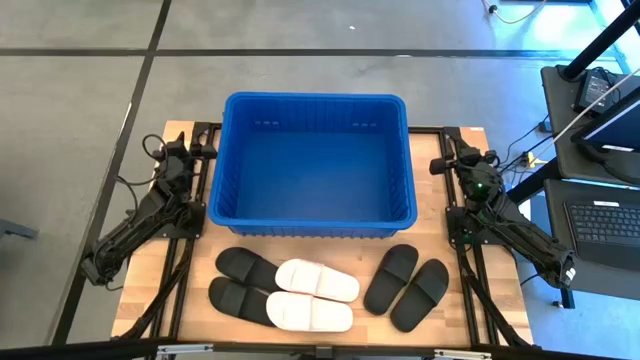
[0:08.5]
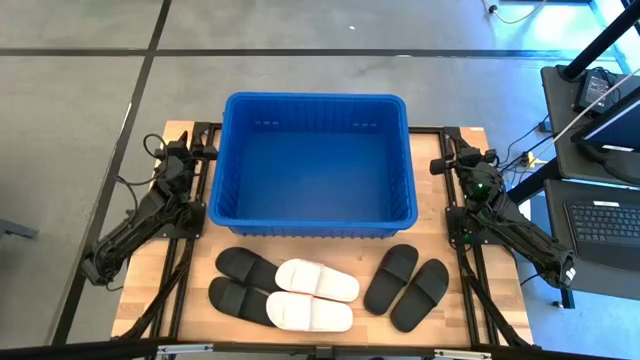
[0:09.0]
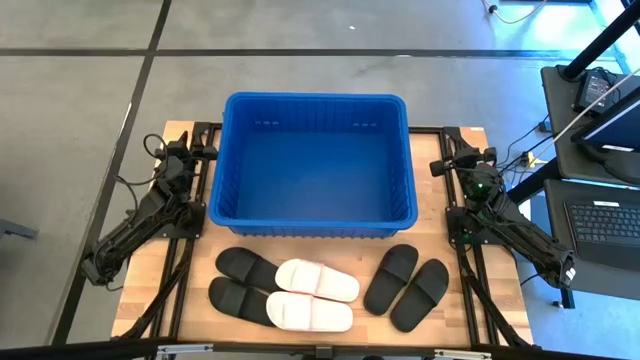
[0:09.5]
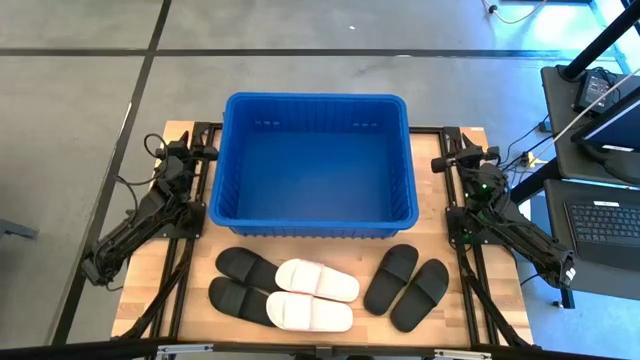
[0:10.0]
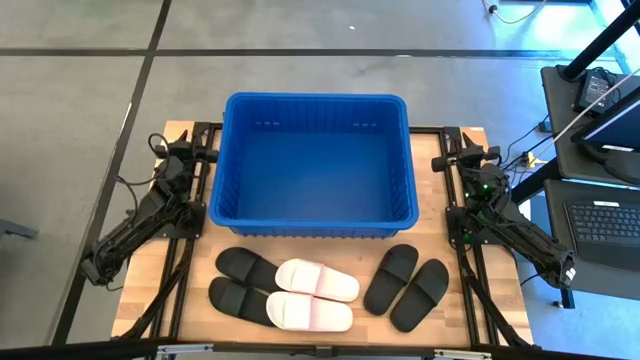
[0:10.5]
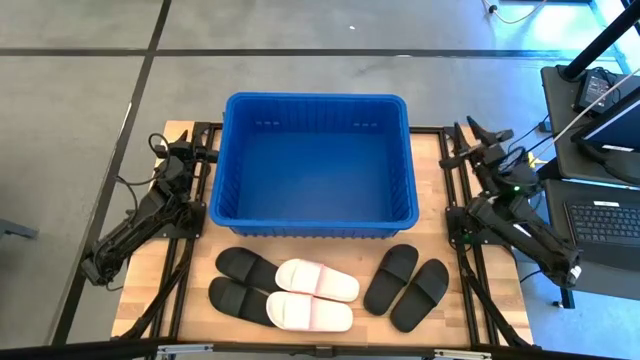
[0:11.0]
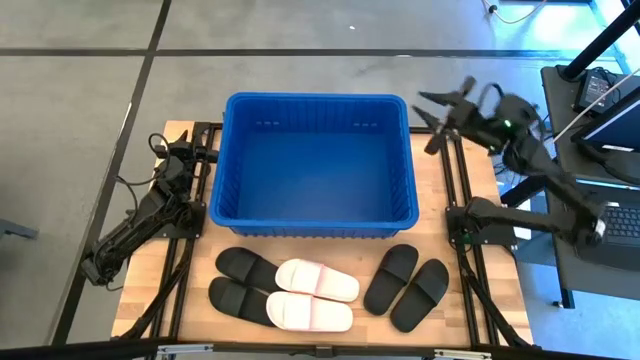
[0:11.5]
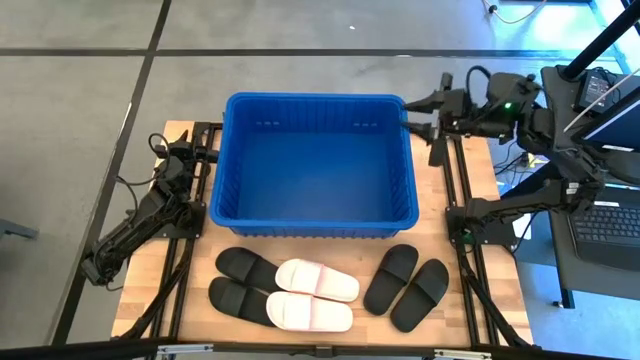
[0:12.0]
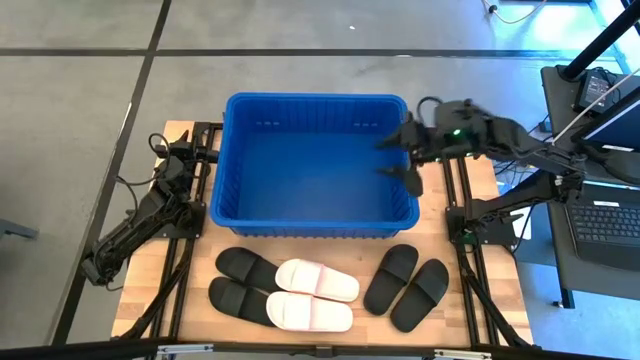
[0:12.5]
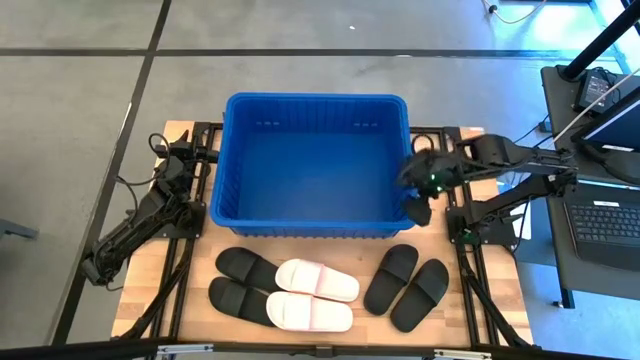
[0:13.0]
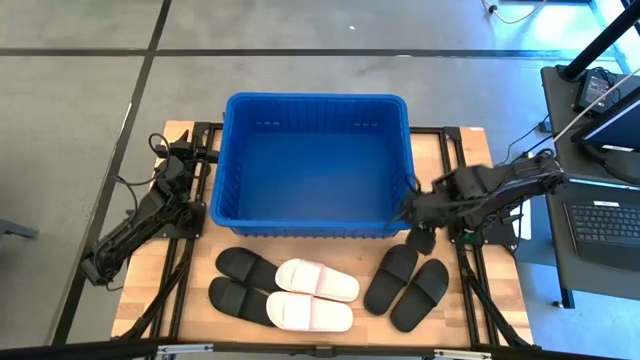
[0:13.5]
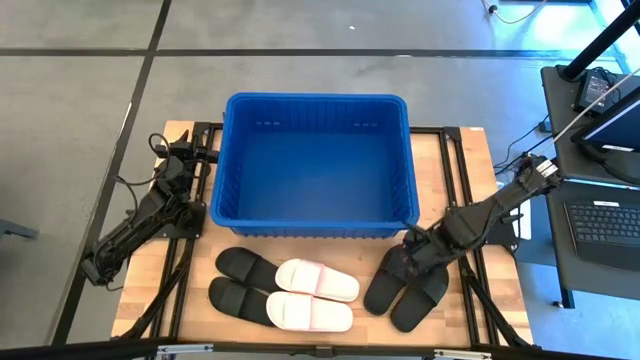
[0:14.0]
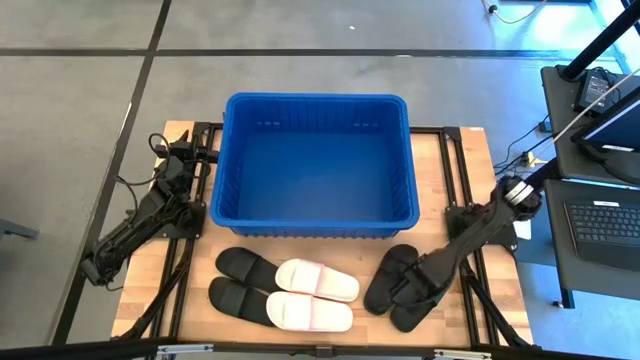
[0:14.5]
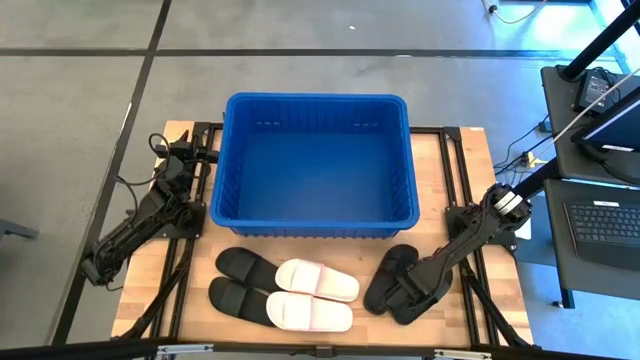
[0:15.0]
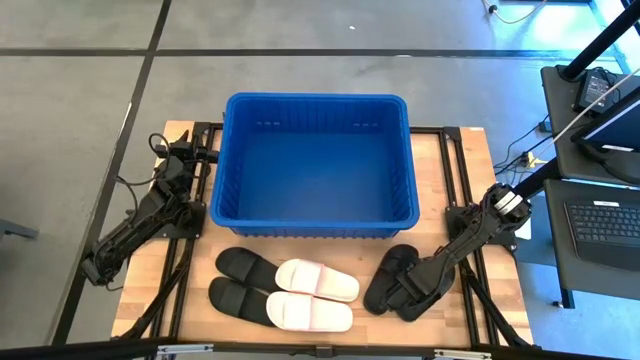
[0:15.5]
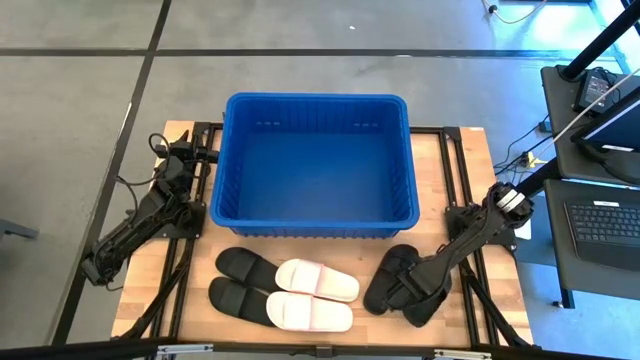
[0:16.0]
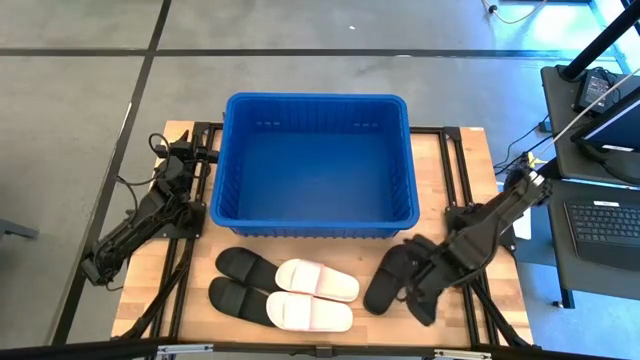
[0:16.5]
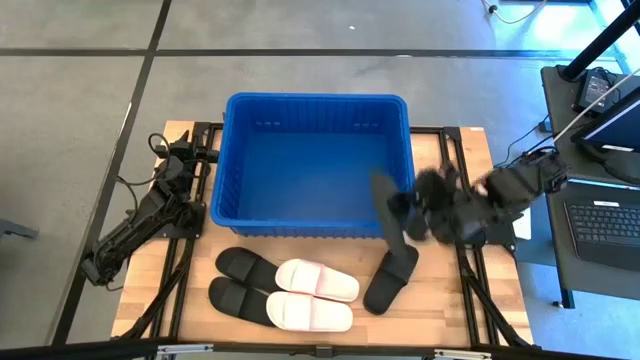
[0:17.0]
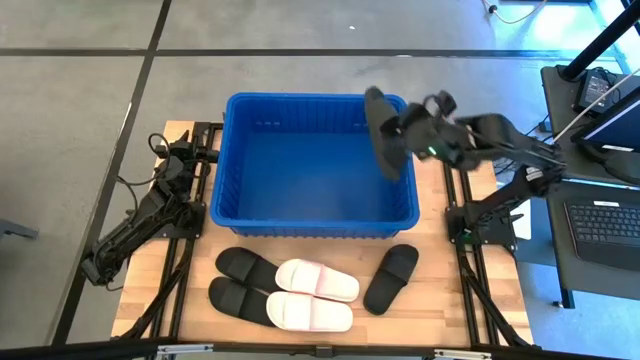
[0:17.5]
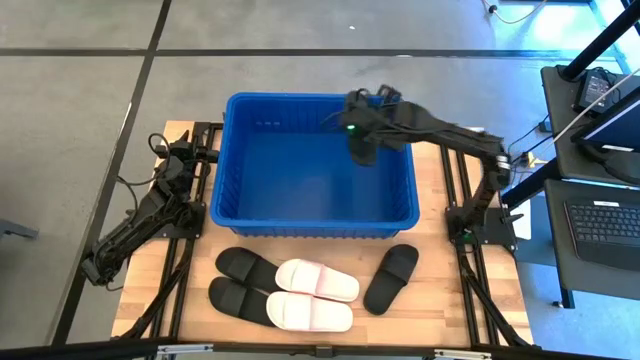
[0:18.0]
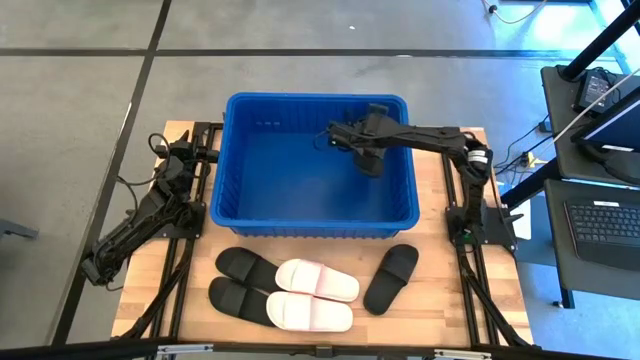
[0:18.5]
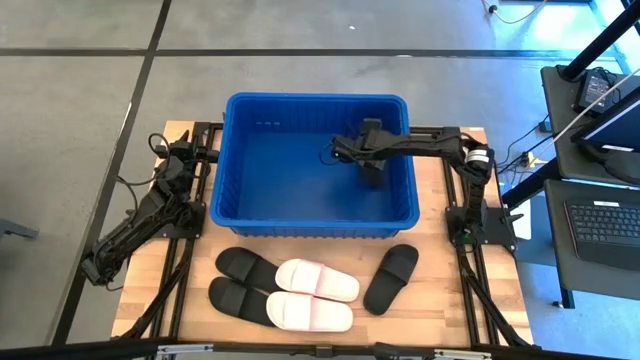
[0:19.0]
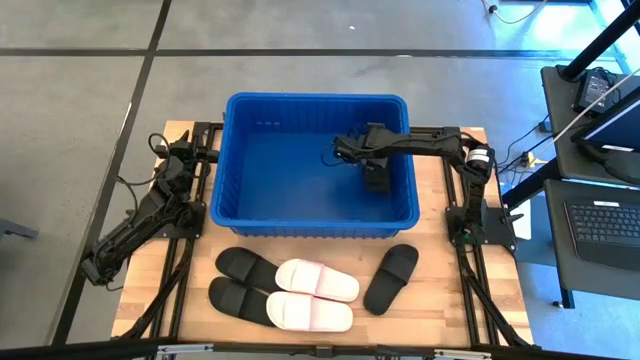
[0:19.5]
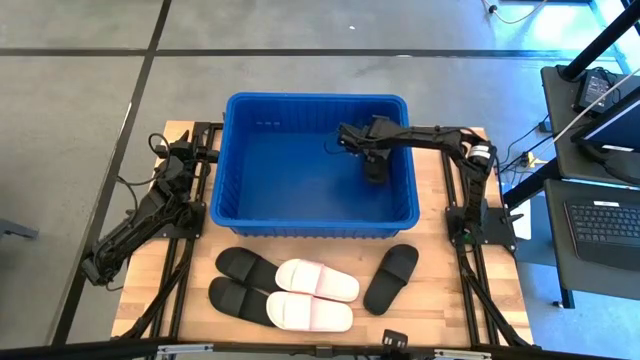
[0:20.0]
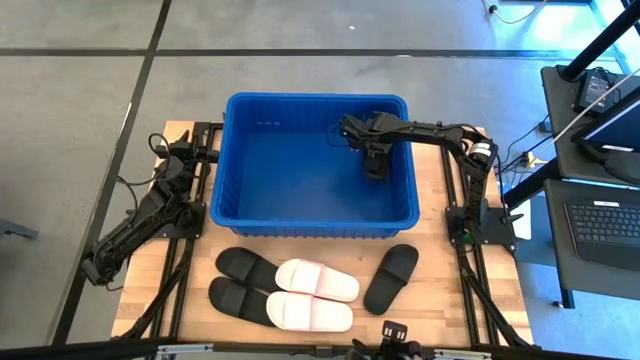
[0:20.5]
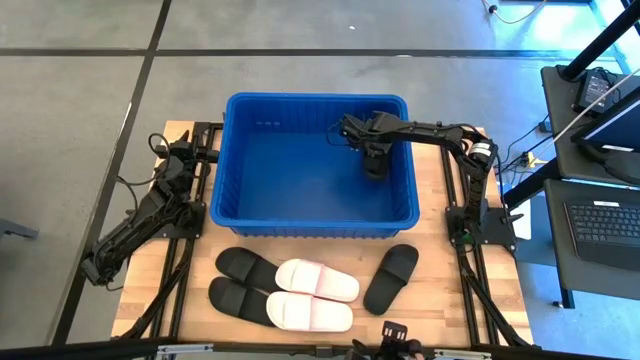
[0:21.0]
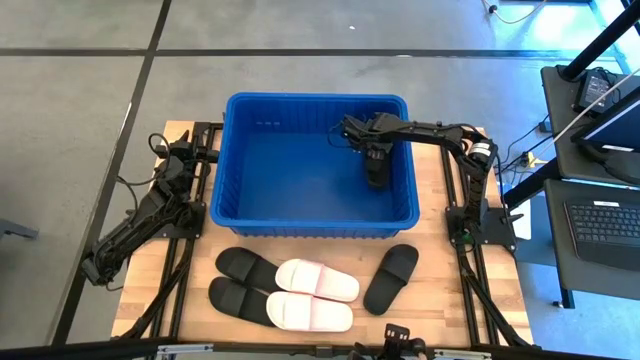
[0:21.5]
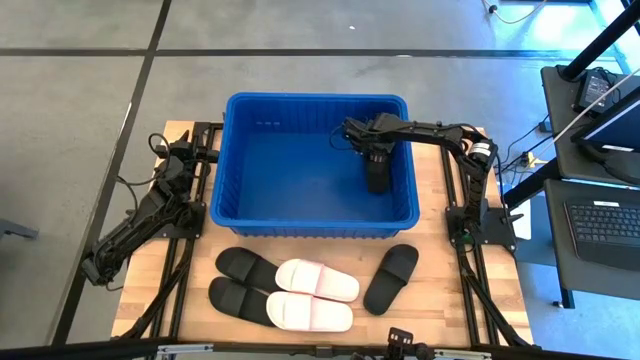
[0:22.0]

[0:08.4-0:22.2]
Task: Pick and place slides into bin
Put the black slide into the blue container

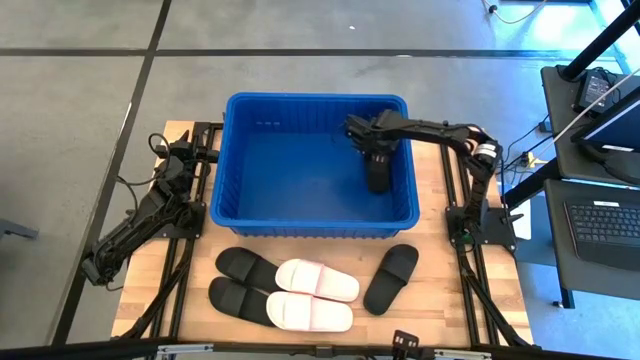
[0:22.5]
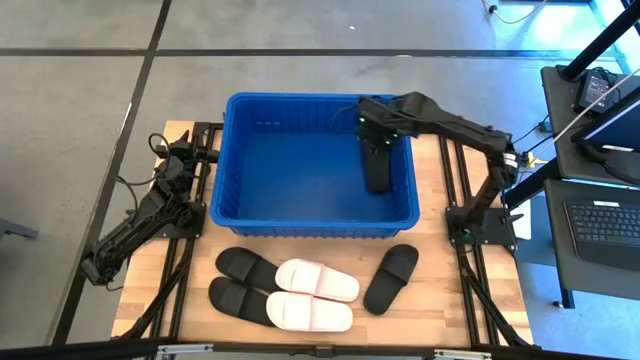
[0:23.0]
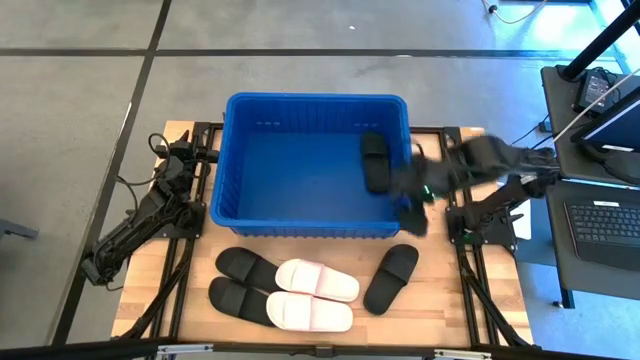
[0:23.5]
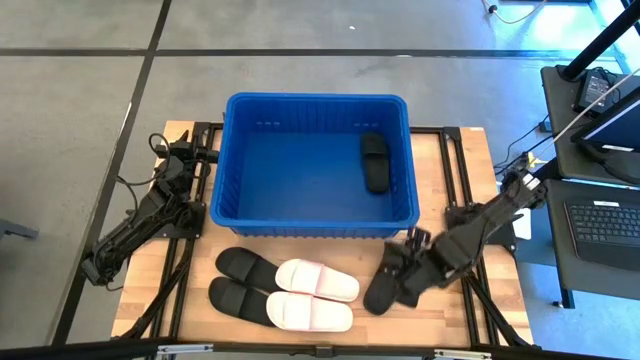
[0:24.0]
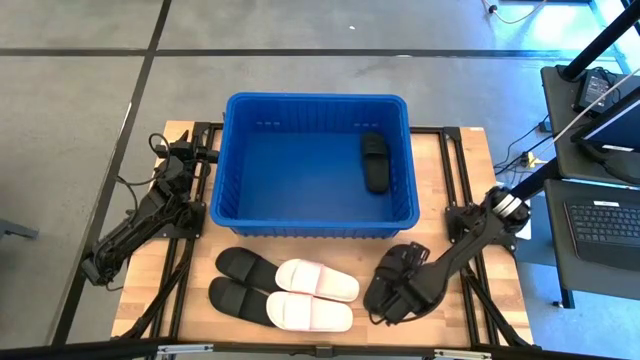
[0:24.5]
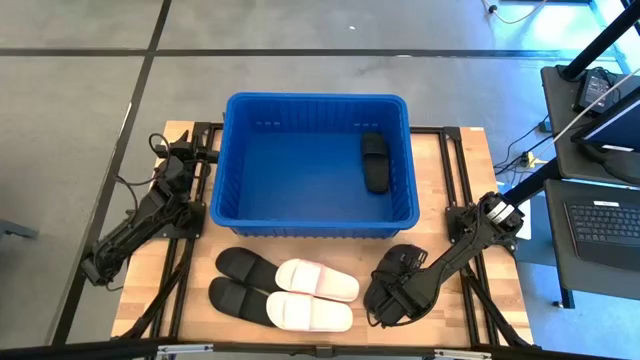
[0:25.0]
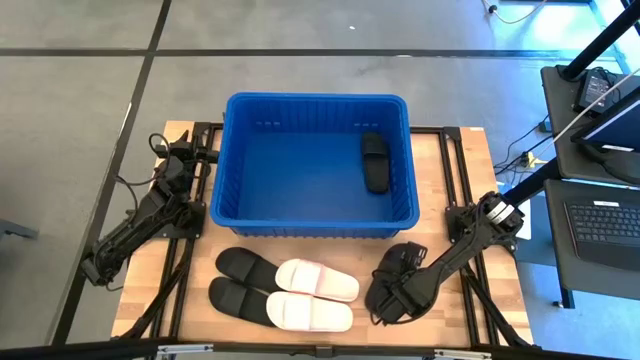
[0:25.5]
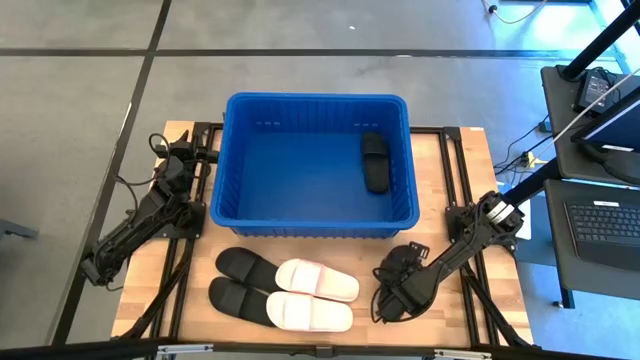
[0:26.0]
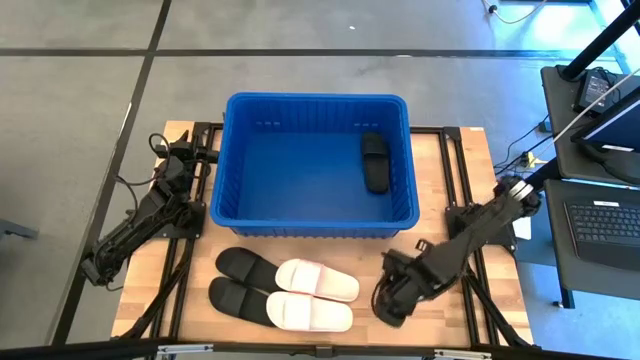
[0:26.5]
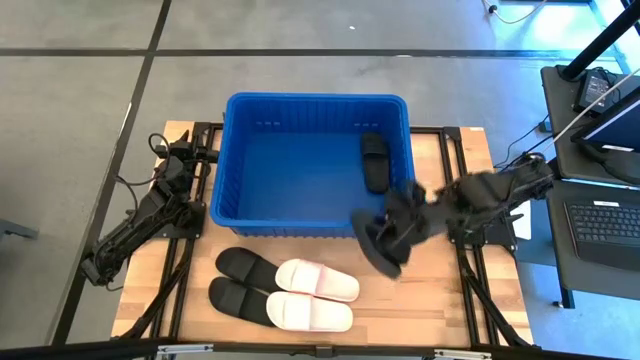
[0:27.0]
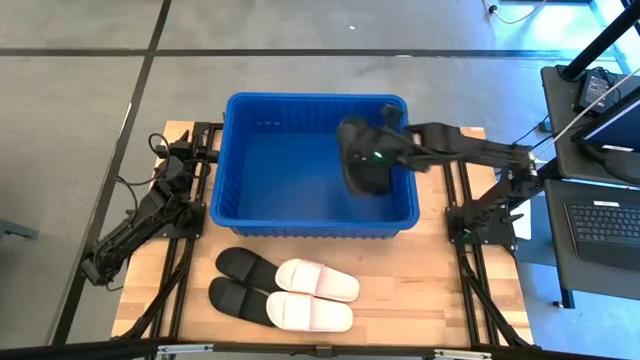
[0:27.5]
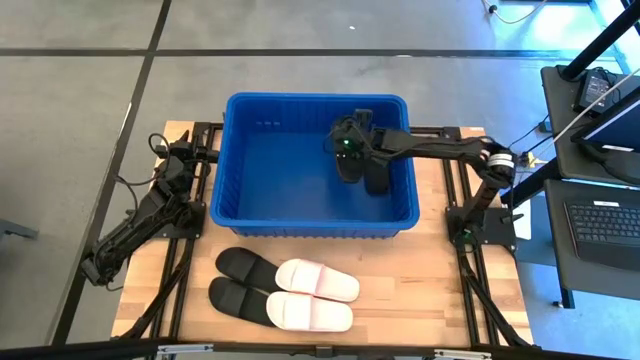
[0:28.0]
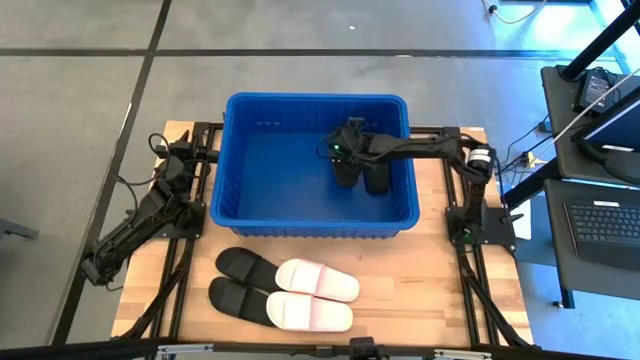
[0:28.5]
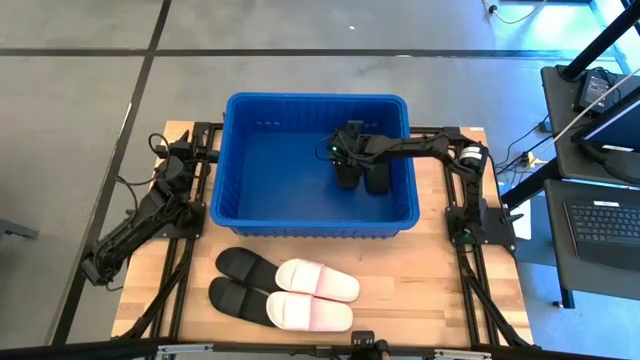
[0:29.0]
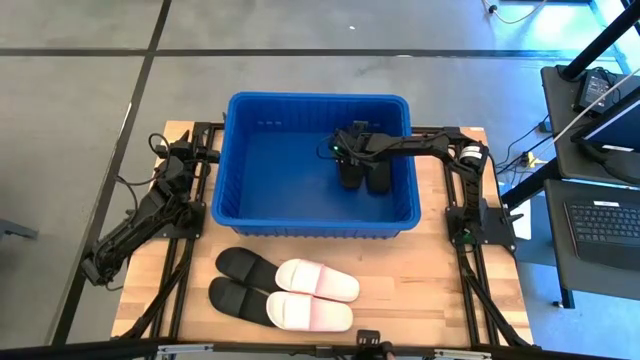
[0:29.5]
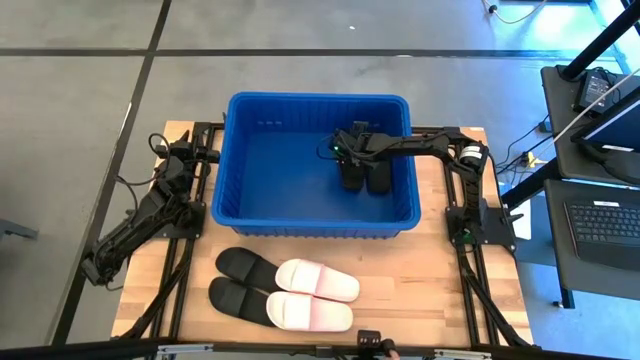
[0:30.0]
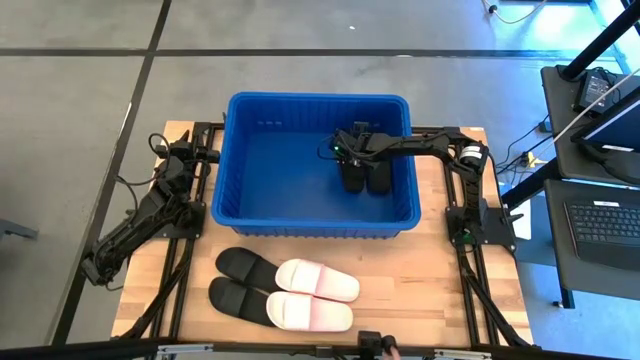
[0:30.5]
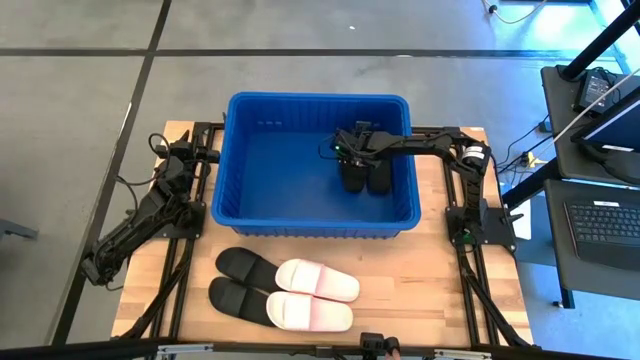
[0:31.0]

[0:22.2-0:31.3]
Put the black slide into the blue container
